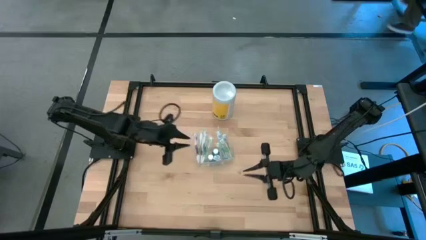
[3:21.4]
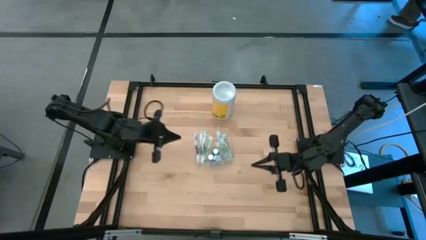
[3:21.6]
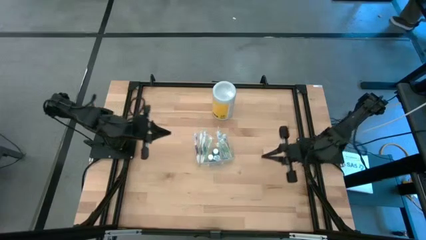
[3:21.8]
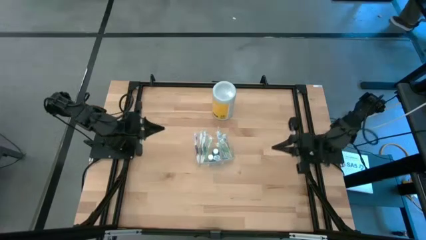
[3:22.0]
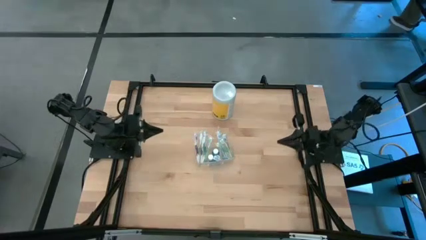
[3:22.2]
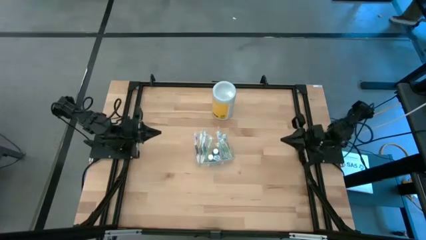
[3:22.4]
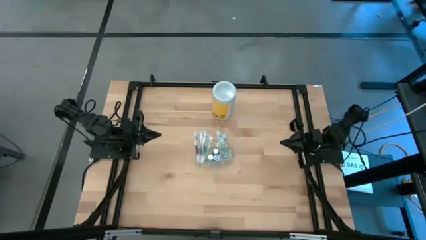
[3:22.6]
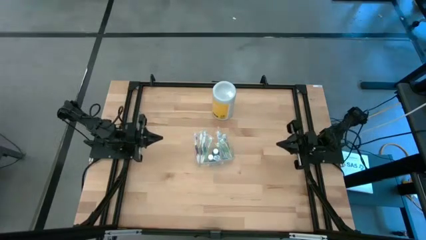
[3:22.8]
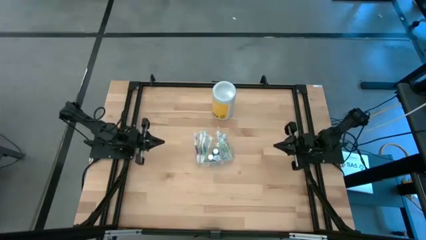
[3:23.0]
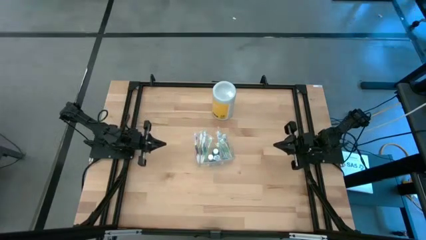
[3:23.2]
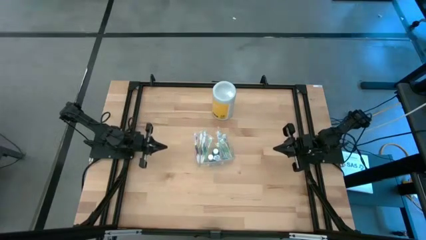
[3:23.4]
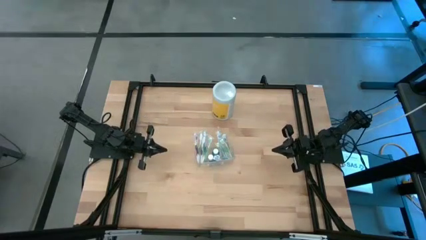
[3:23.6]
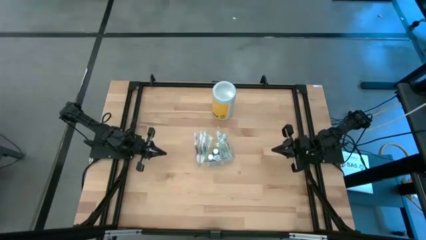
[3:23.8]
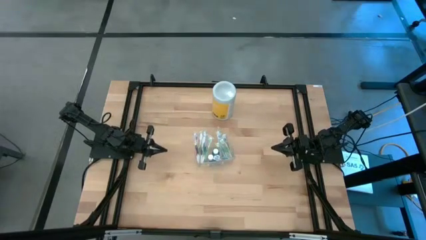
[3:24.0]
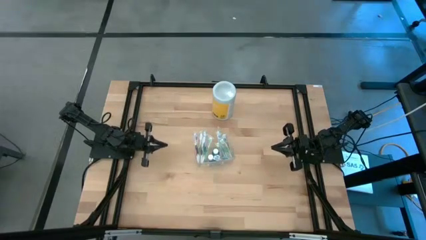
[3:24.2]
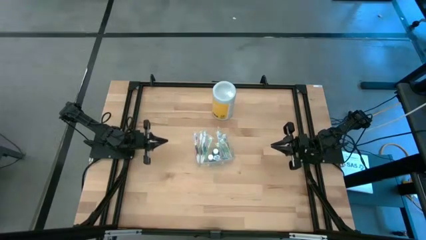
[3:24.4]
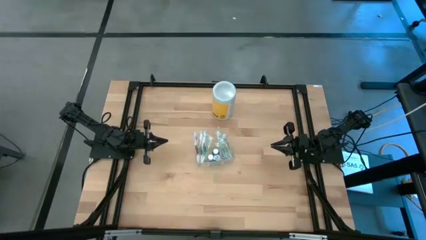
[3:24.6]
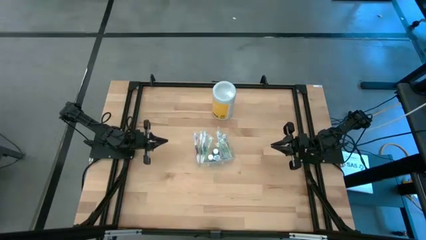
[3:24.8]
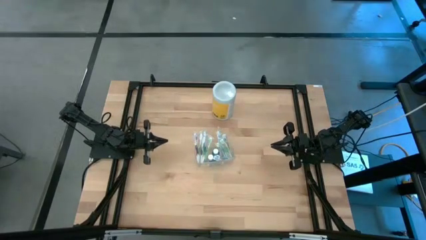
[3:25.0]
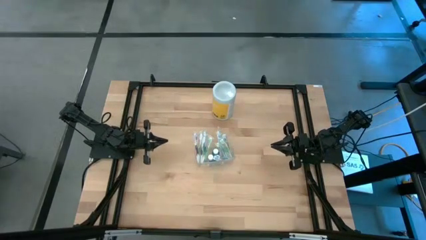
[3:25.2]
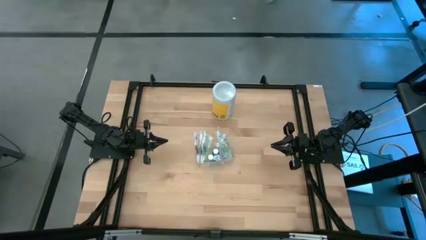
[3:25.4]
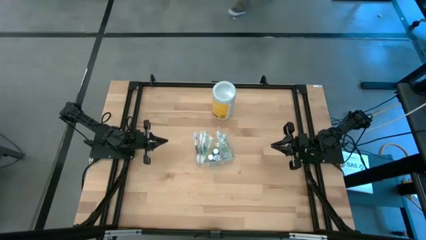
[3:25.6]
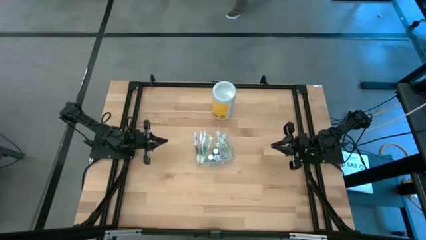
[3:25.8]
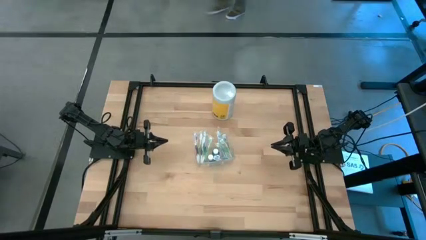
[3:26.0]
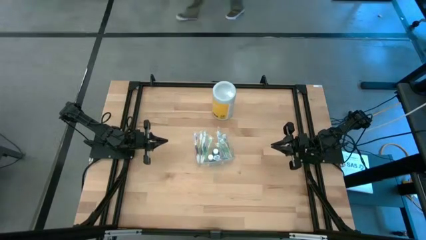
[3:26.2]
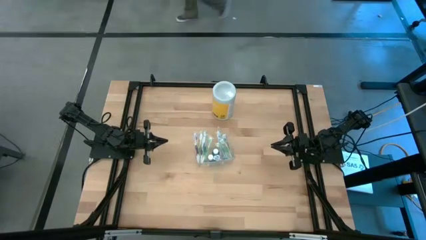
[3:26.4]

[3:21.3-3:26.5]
Task: Pick & Place toothbrushing station
Return to Home Position

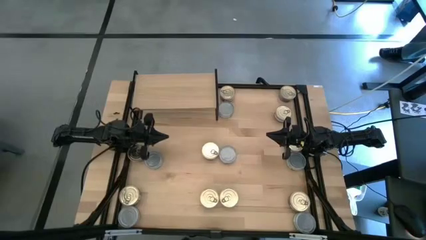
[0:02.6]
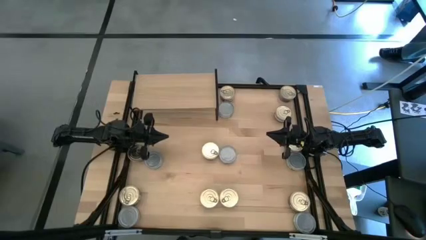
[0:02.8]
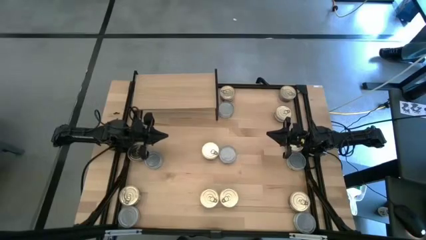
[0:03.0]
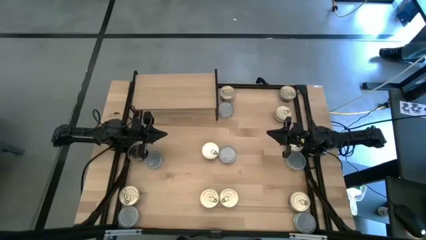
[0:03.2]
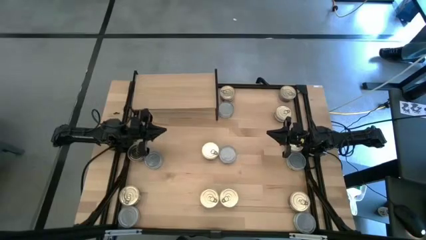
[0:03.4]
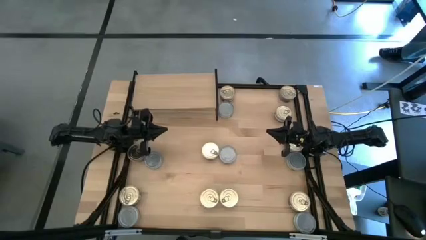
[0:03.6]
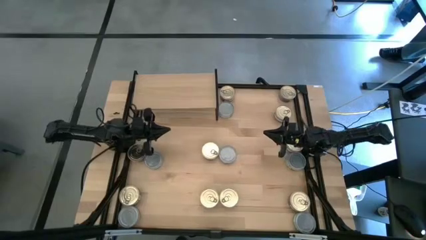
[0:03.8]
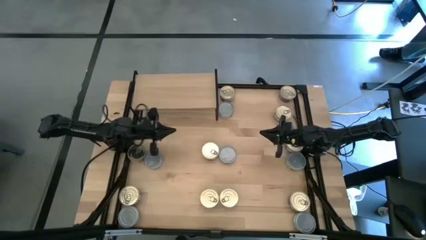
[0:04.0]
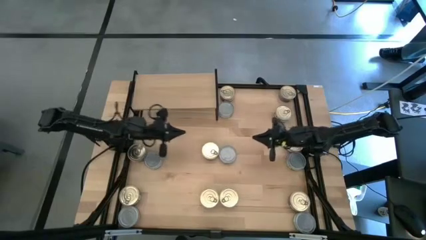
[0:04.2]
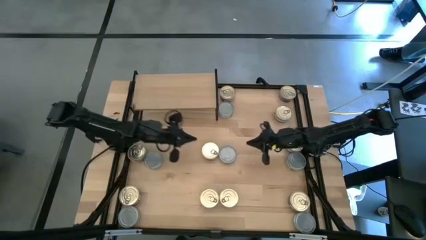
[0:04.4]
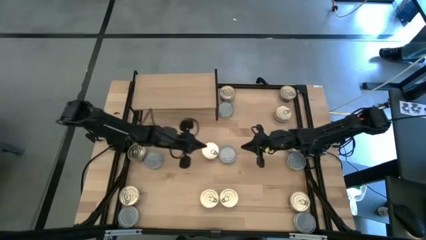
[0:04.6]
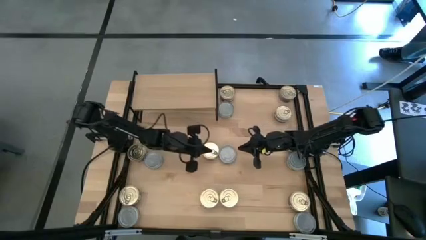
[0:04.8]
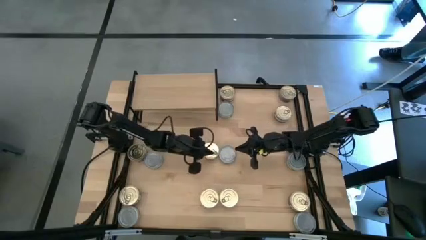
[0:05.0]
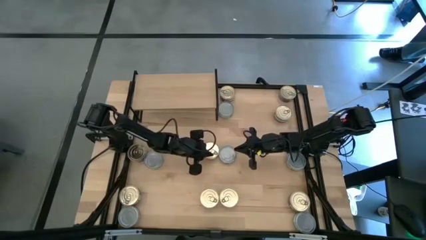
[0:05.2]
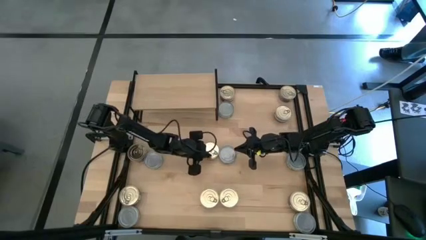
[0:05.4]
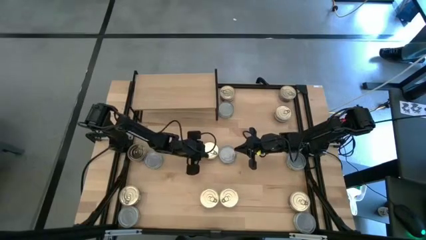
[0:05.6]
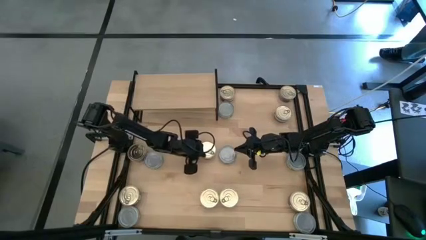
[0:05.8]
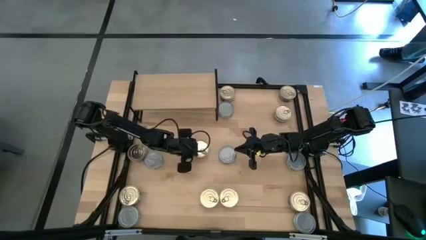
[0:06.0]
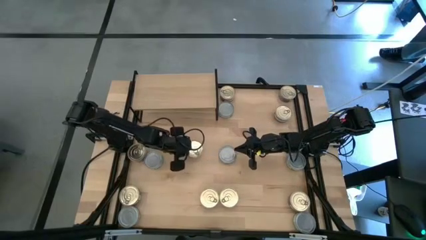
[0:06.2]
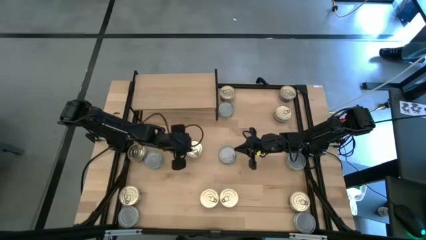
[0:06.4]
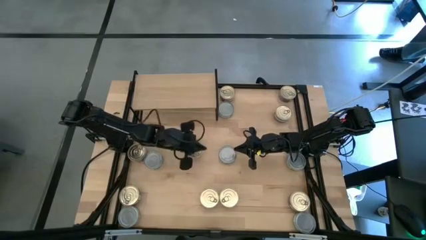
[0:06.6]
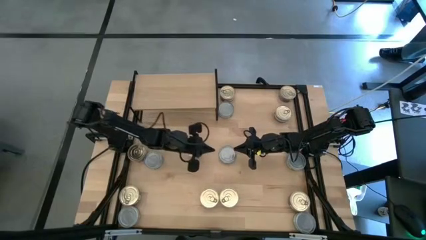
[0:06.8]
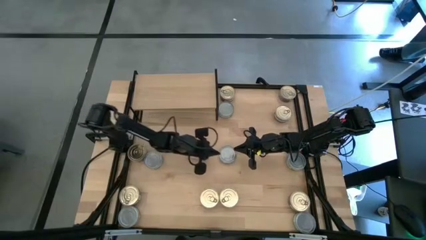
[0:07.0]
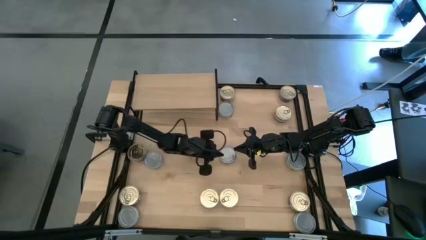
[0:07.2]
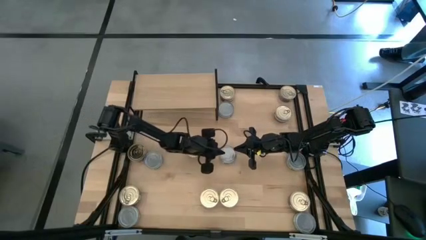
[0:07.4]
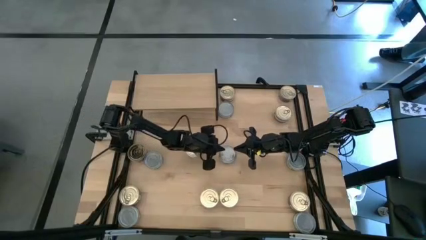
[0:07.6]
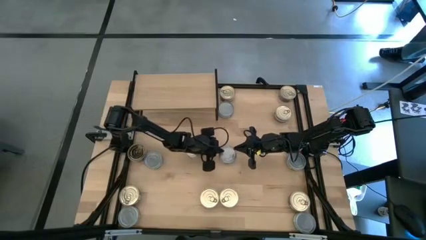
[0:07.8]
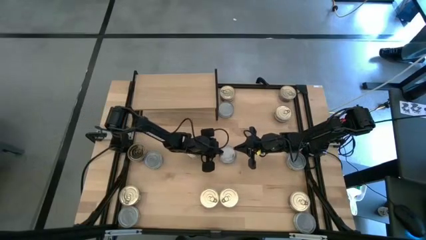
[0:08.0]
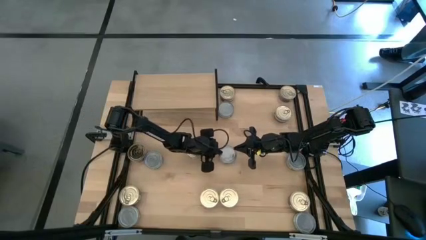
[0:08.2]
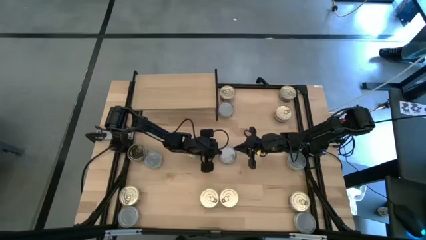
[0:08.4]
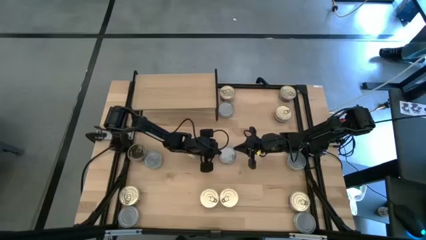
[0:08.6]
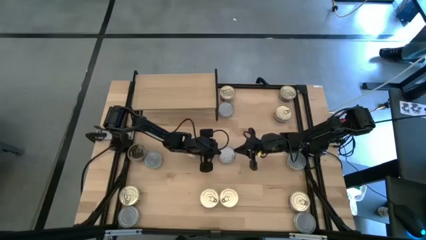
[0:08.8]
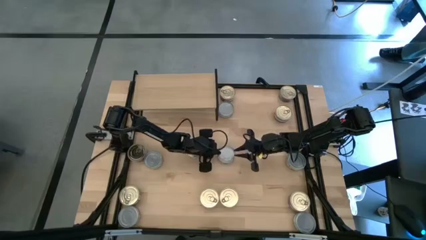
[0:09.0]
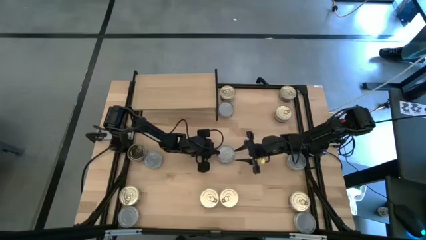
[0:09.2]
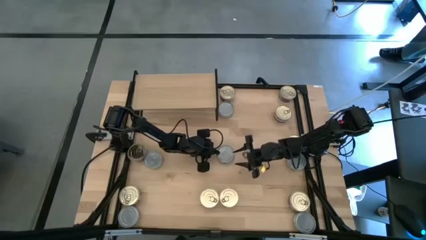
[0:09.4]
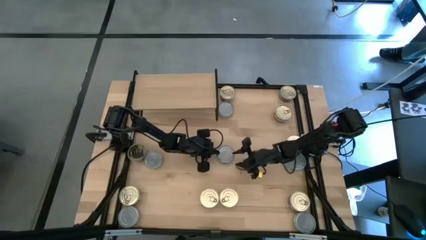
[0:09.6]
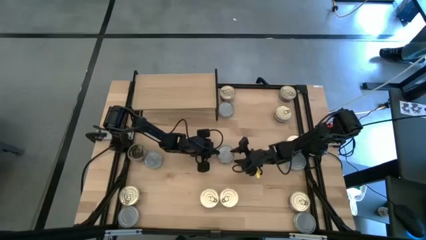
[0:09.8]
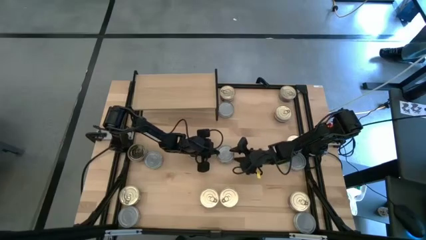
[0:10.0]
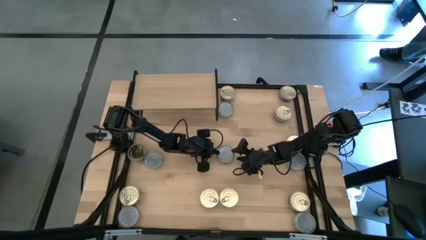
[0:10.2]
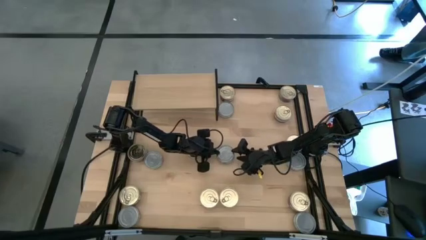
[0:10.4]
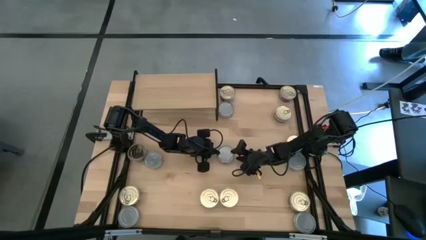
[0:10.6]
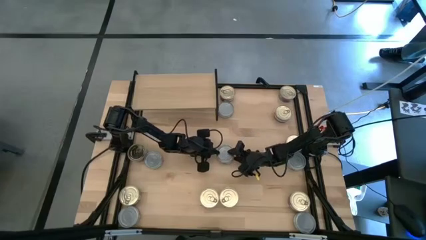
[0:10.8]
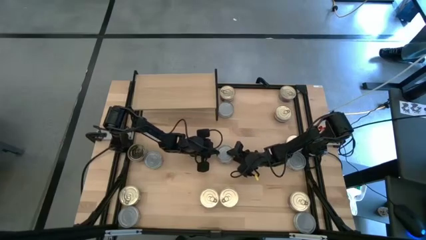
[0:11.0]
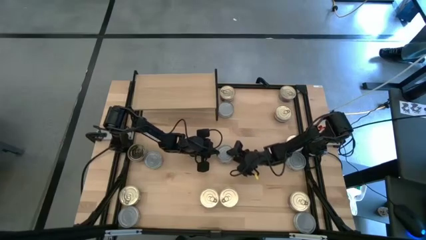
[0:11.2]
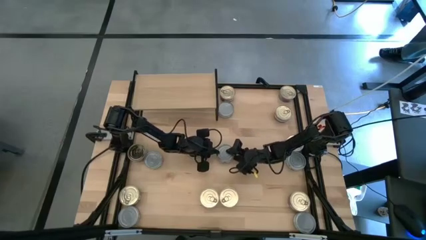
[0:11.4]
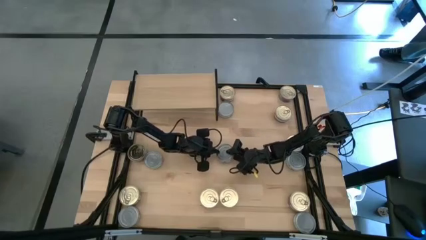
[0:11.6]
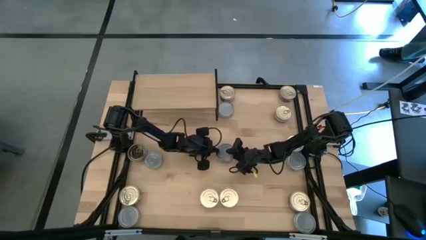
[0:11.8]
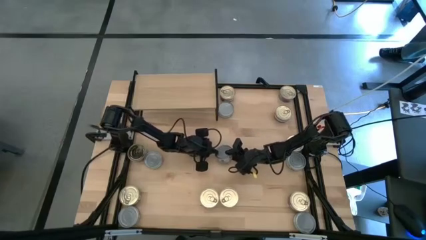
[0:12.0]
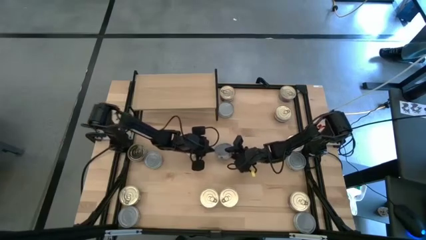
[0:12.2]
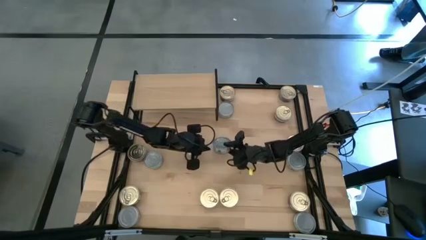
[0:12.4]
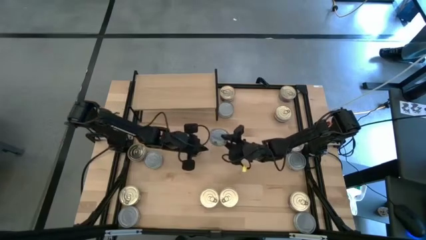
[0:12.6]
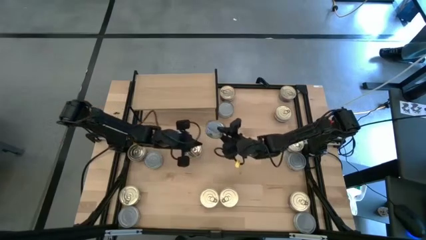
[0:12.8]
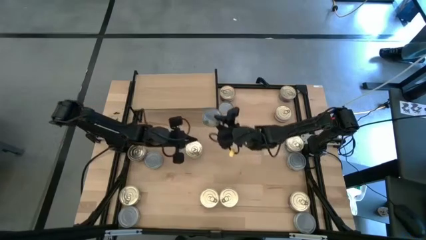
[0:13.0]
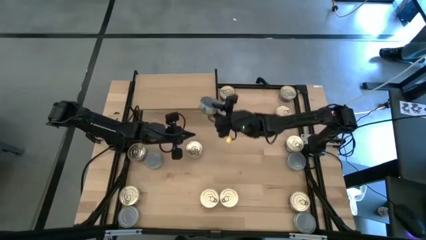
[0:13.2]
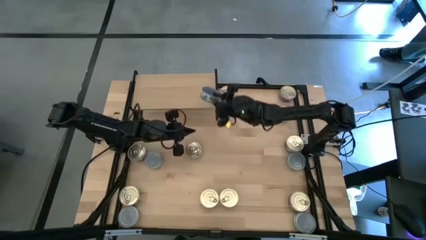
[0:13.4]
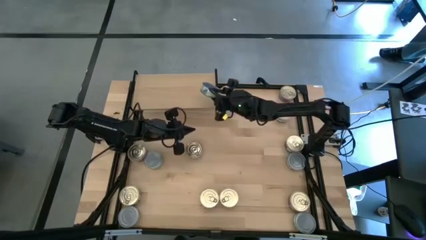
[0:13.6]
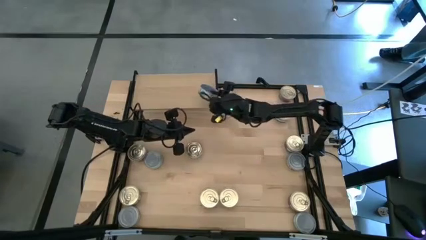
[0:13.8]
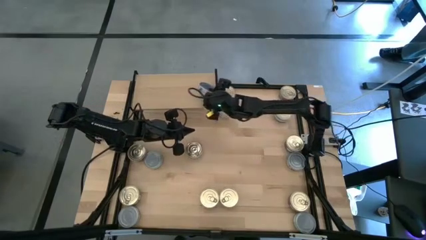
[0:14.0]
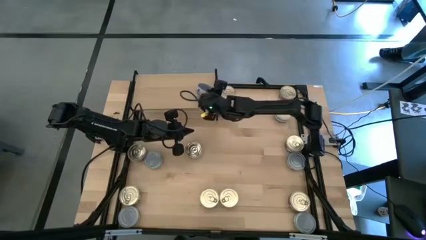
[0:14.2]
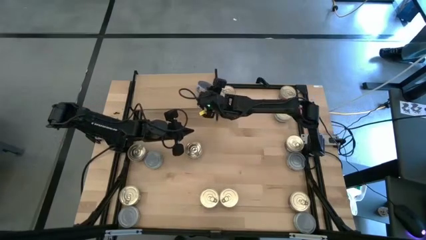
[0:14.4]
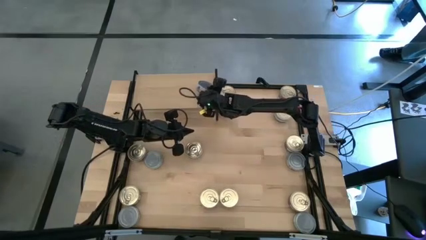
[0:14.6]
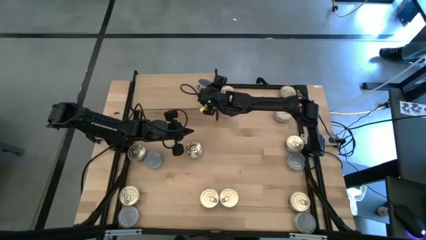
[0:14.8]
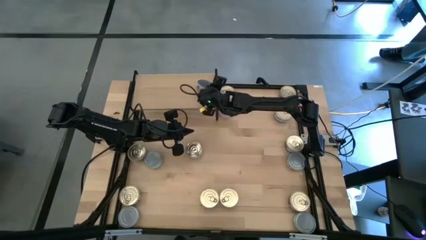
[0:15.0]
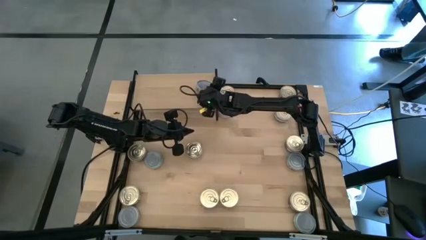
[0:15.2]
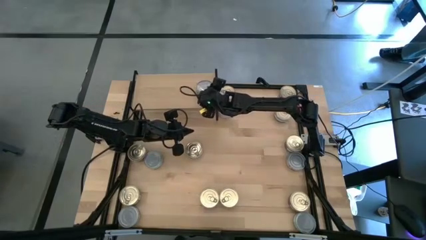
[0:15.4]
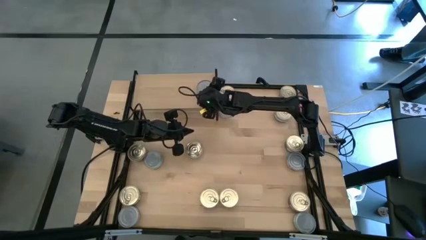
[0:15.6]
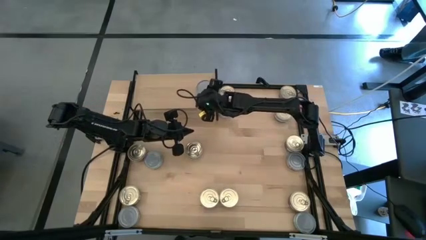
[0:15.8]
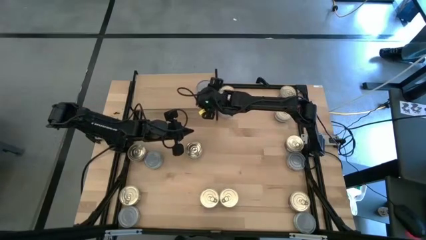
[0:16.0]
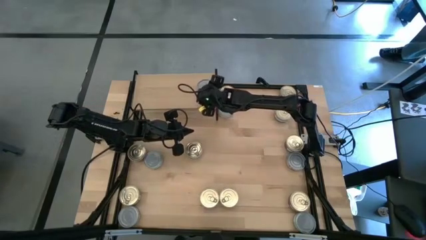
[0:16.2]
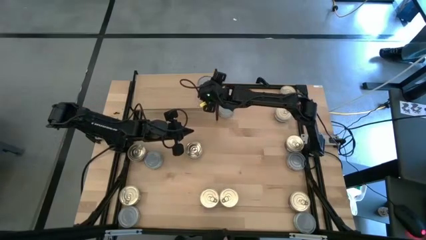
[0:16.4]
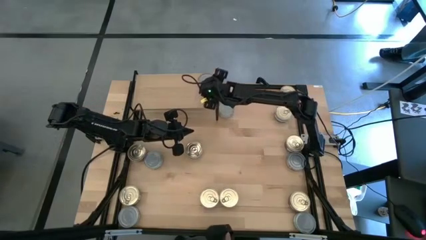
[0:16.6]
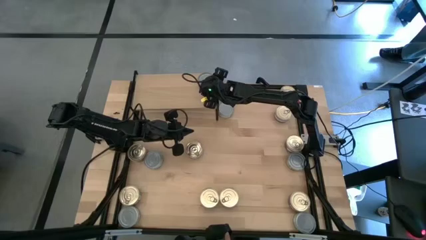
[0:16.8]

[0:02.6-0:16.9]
Task: Stack canned seafood by type on shelf
Put the green tuna can on the shelf
